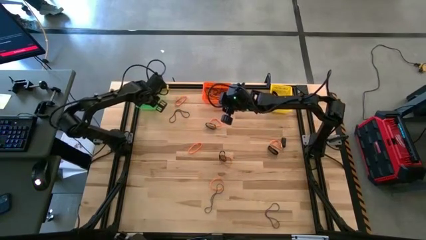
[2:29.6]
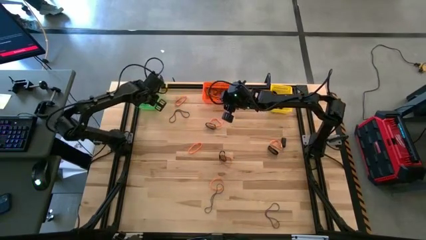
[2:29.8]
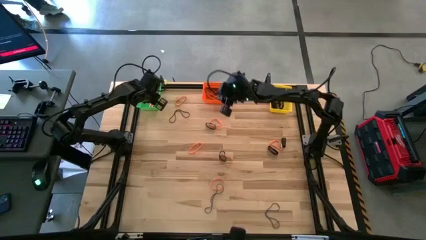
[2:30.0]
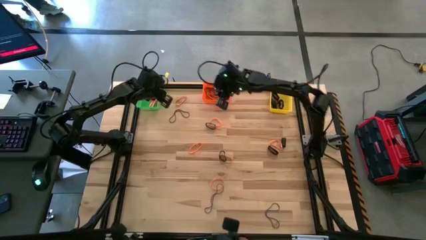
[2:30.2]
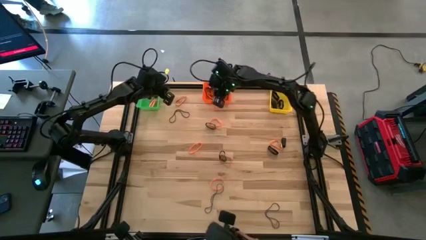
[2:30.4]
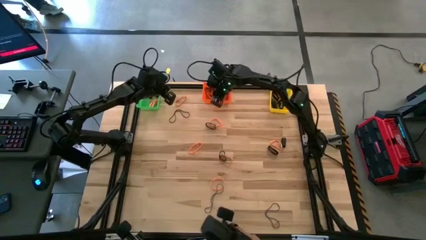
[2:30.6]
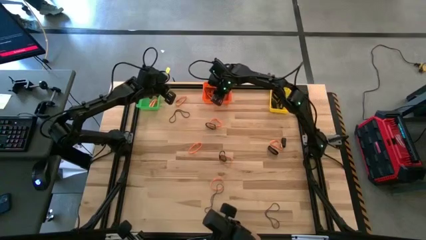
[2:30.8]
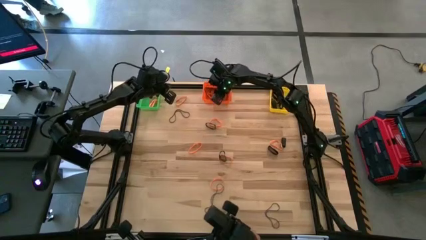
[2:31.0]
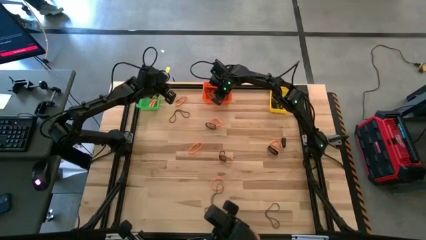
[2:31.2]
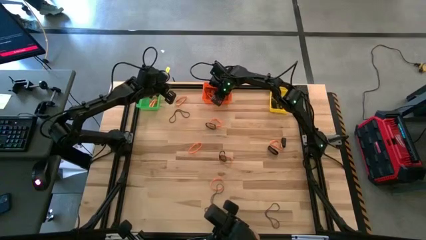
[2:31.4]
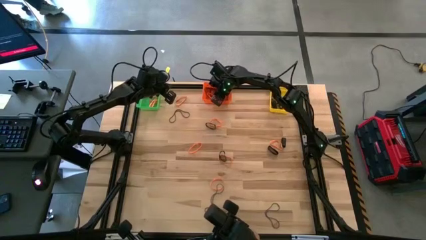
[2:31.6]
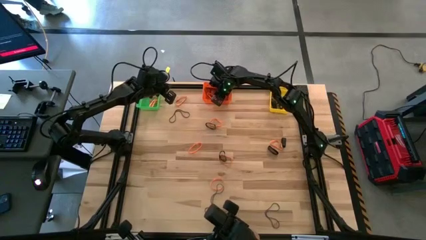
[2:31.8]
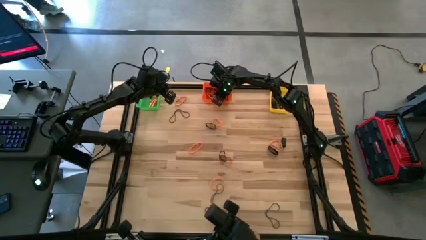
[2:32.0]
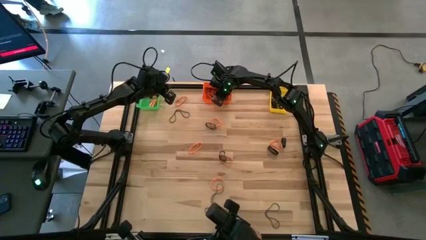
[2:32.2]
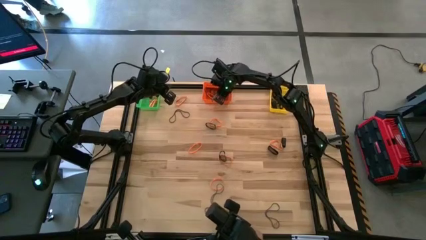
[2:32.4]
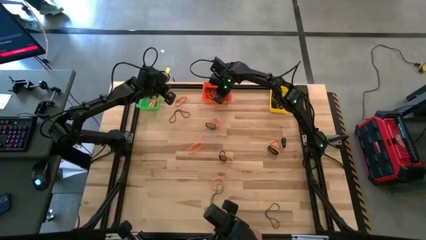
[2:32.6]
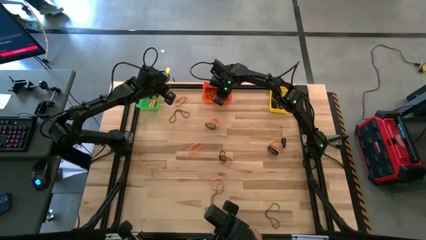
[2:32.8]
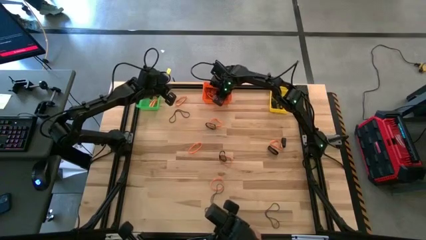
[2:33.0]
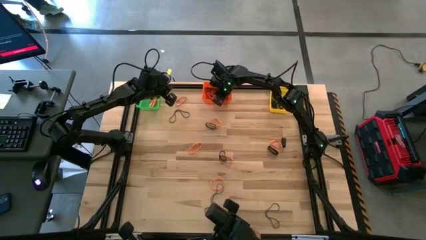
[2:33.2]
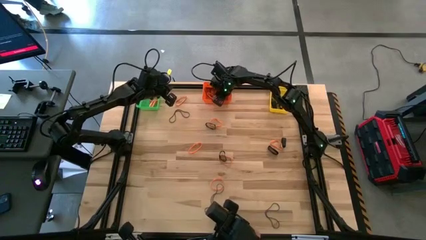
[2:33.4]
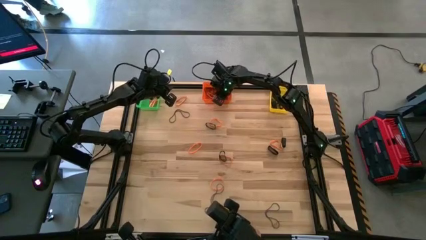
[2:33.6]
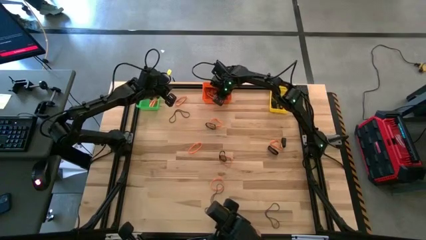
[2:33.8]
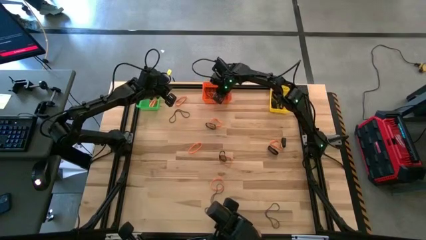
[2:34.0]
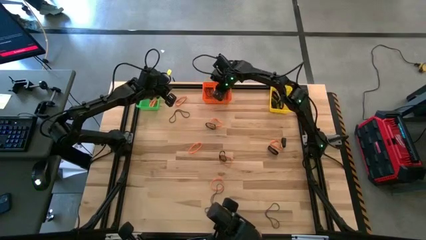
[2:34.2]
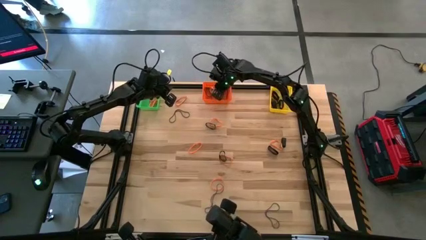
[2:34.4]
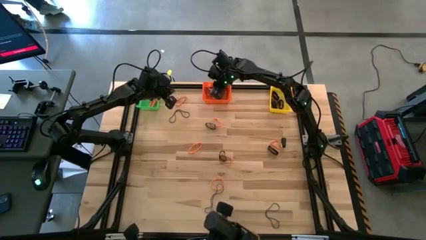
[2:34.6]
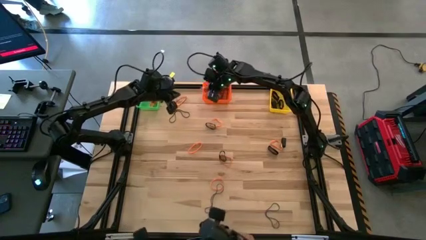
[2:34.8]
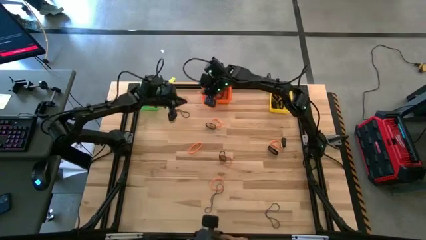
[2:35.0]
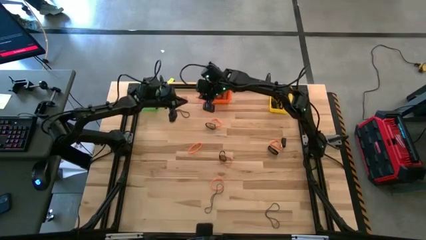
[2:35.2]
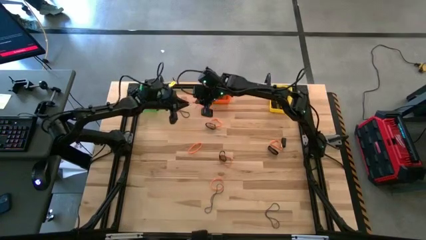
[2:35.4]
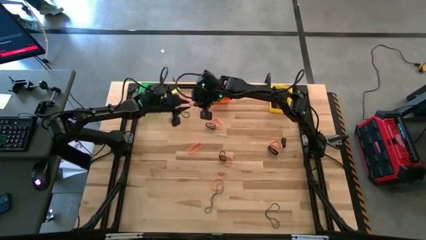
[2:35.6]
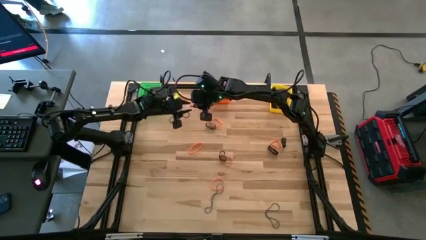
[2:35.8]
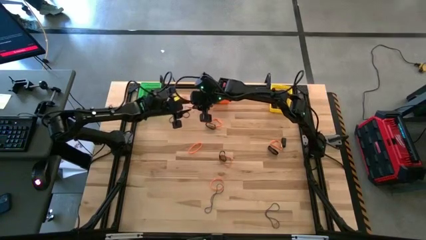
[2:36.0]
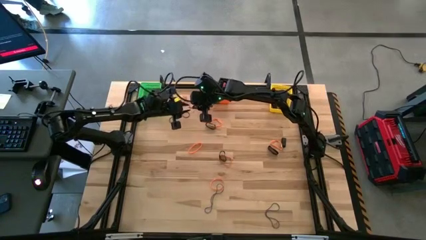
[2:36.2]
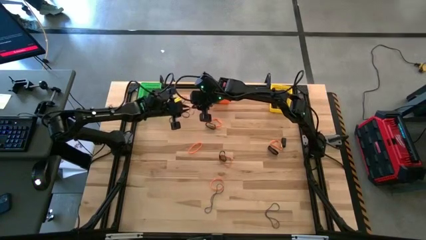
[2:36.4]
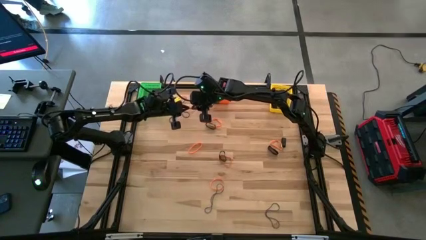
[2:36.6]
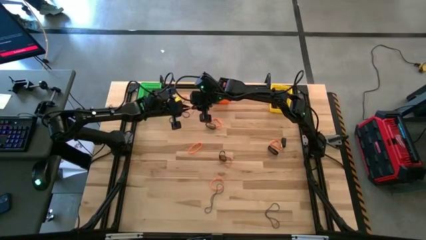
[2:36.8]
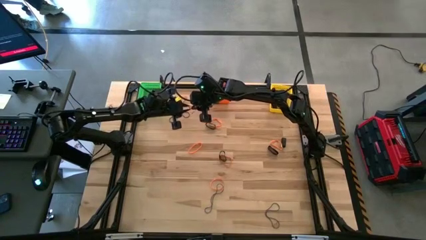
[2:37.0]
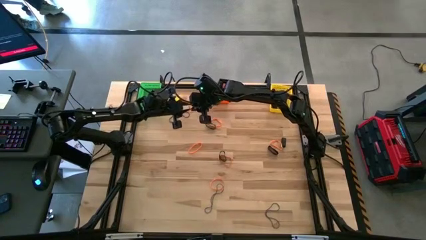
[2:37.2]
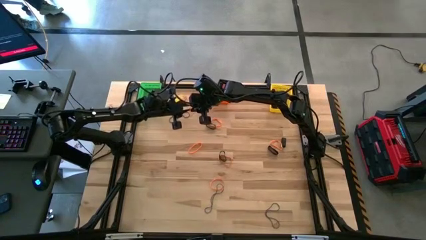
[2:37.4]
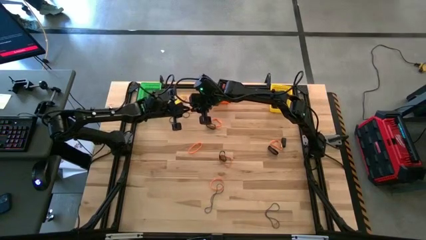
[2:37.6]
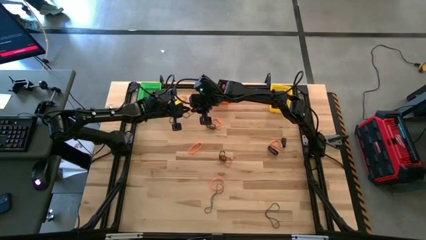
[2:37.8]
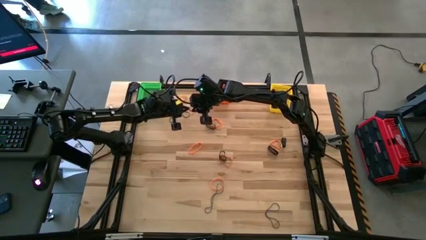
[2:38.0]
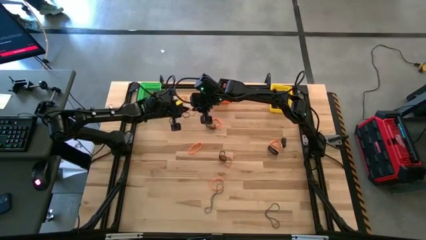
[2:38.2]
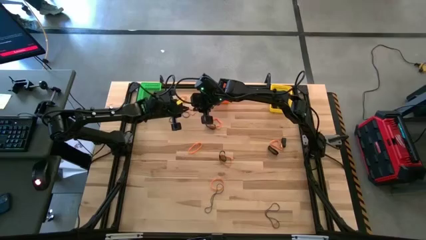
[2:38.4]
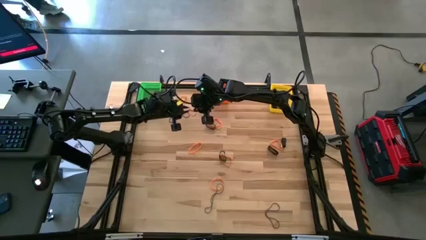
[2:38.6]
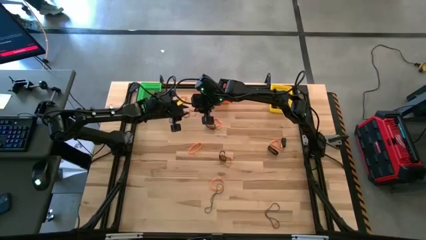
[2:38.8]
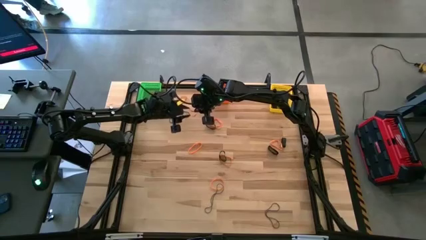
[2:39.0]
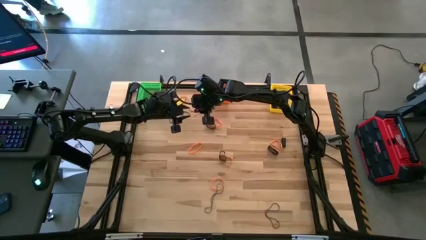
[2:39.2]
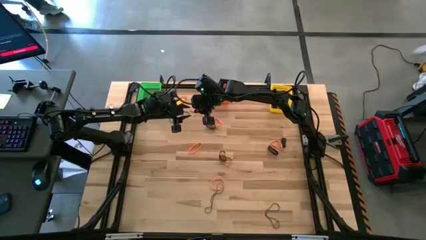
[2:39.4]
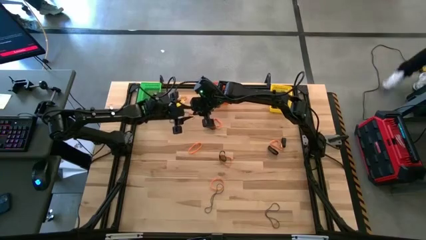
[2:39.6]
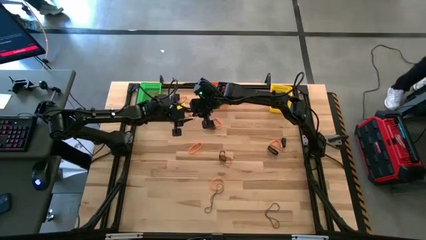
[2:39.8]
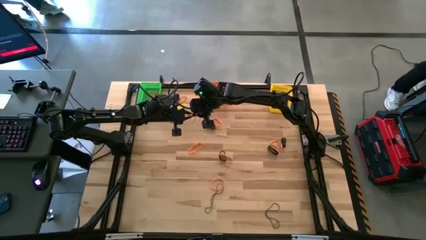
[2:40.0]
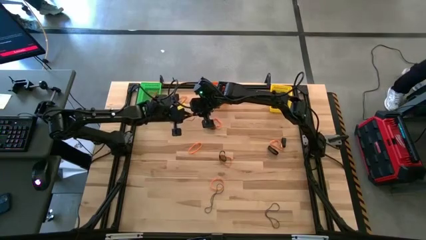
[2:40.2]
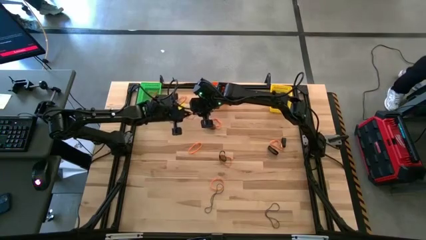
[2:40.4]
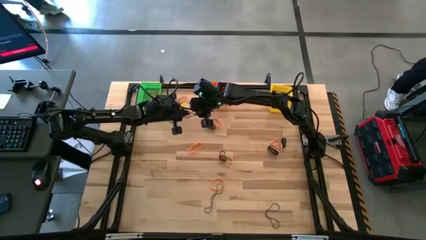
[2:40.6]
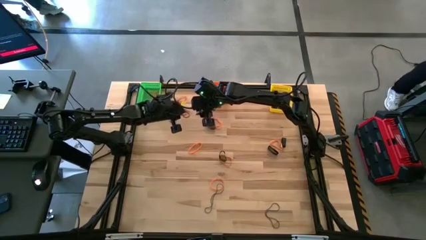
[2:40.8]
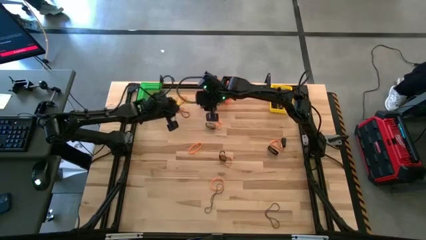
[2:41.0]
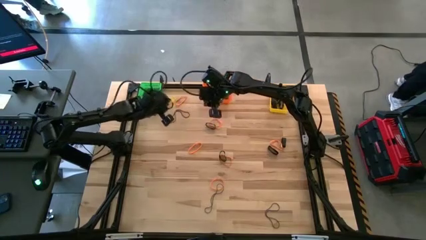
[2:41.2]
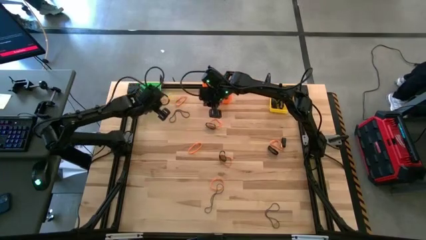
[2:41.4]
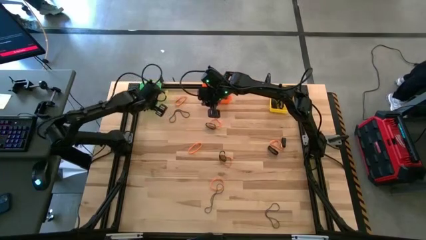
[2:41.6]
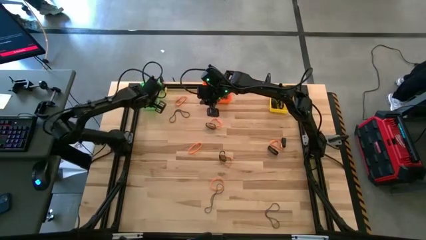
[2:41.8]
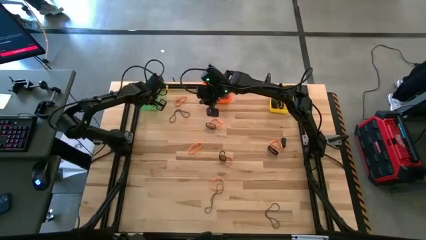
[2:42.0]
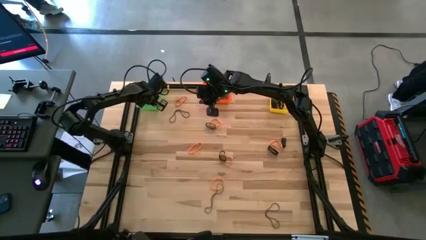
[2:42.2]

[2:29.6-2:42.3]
Task: Sort rubber bands into baskets
Remove the orange rubber band from the orange basket to the green bin

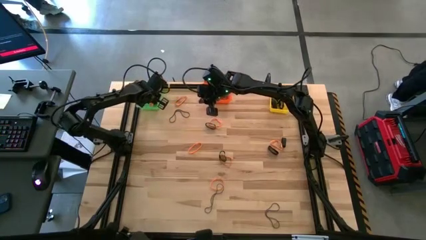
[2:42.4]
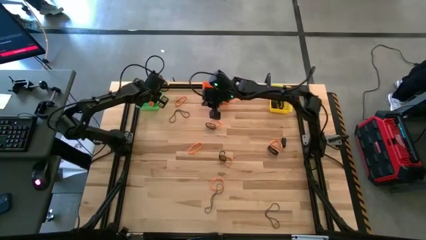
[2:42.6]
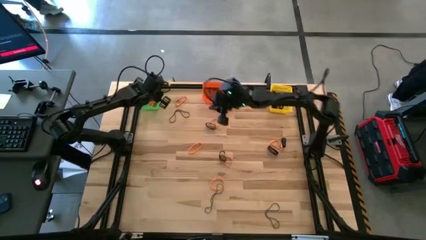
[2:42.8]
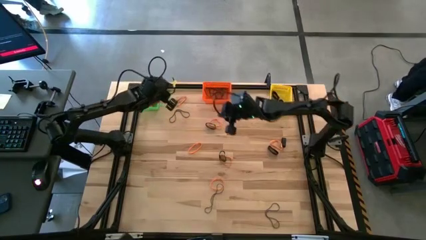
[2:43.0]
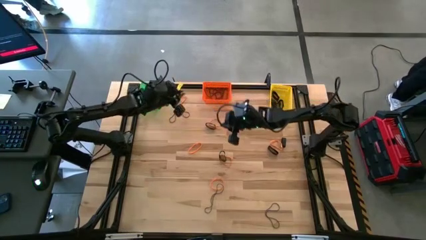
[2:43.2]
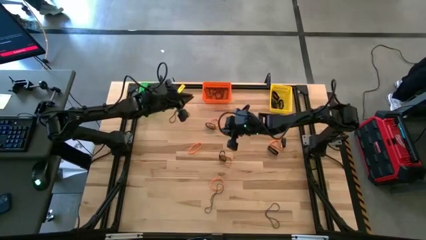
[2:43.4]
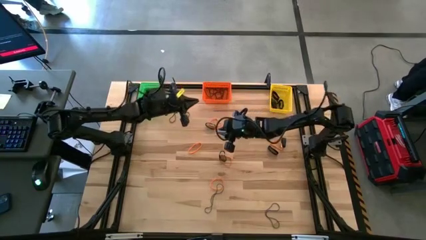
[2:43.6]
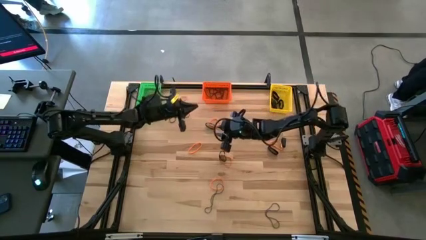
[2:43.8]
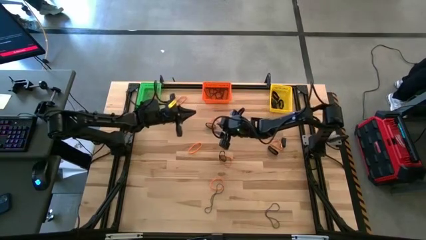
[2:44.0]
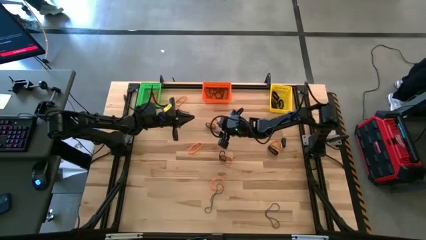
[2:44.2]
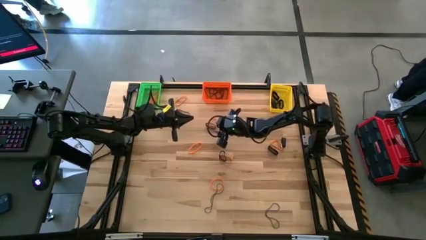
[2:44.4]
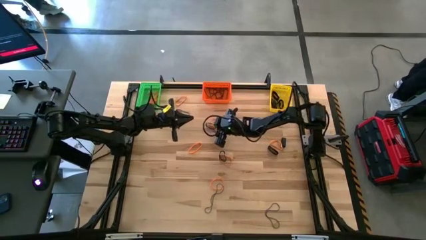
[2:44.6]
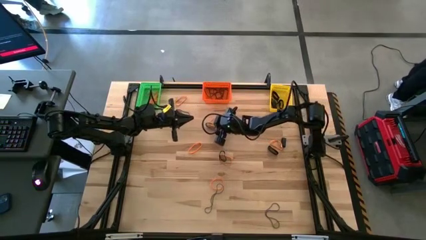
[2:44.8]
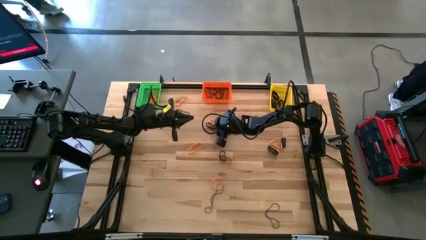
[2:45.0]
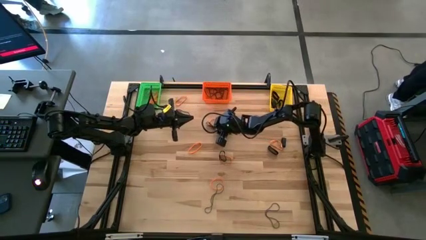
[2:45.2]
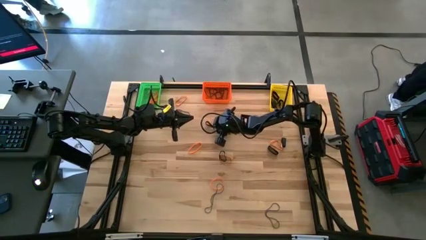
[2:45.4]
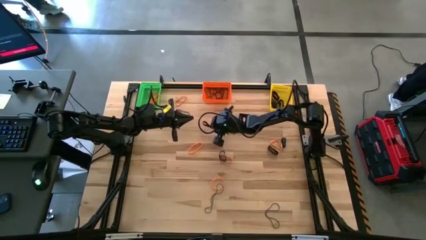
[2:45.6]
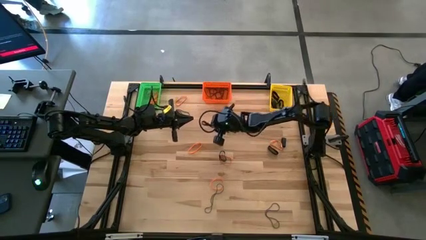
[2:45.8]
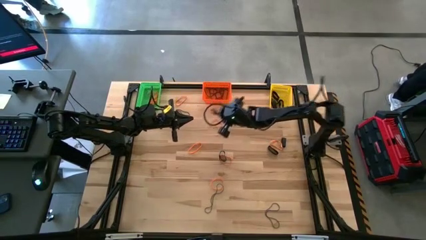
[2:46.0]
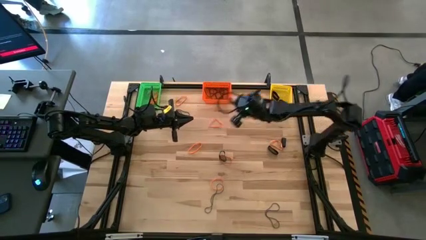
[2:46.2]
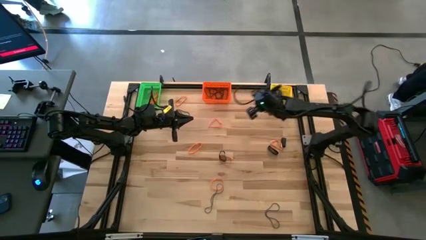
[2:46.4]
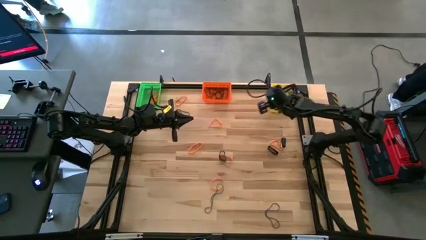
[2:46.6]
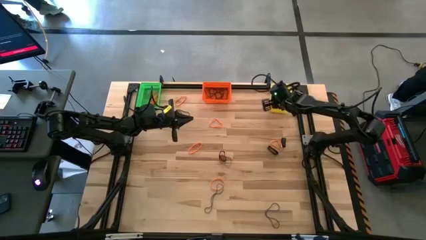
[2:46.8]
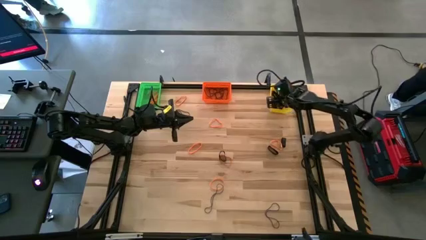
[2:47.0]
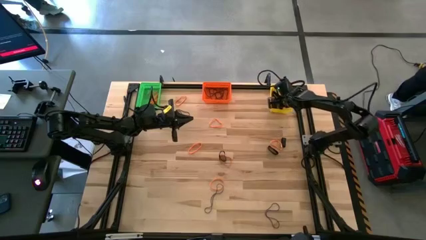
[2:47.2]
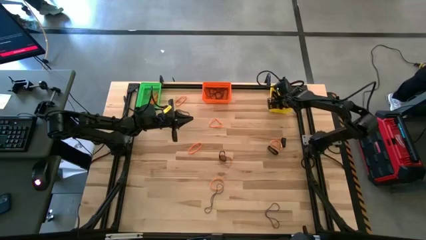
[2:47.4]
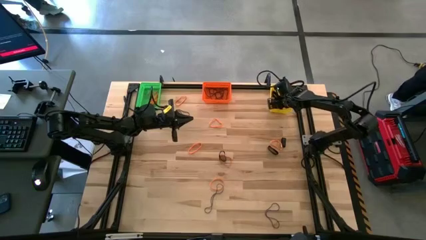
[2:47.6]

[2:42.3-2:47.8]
Put the top black rubber band into the yellow bin
